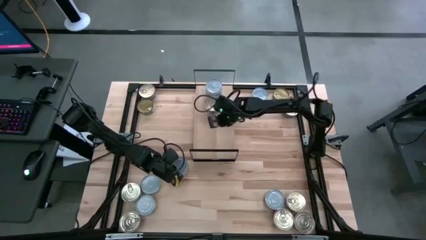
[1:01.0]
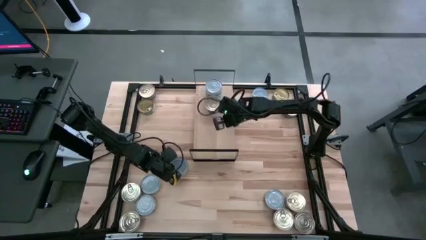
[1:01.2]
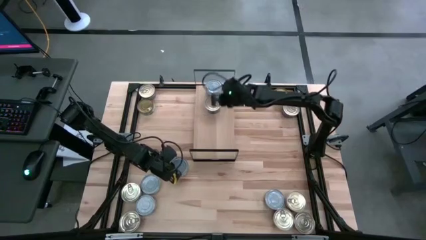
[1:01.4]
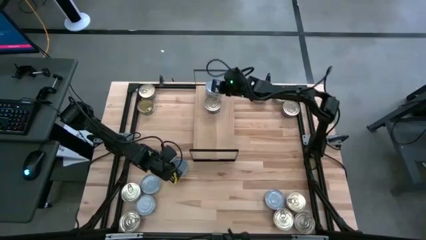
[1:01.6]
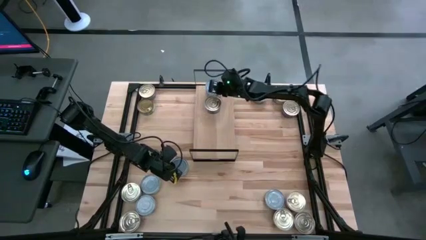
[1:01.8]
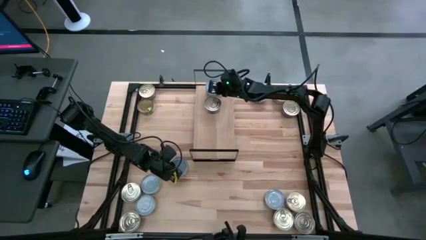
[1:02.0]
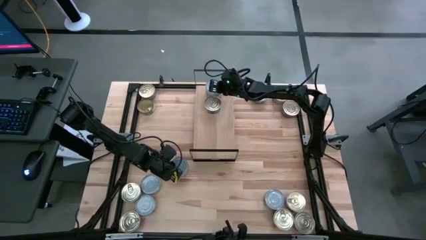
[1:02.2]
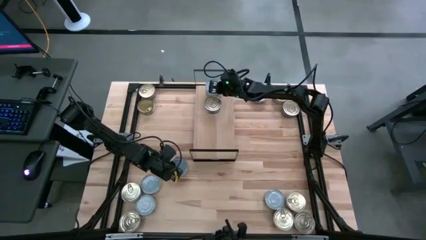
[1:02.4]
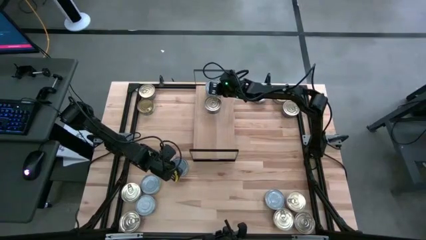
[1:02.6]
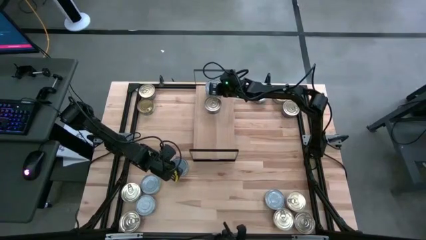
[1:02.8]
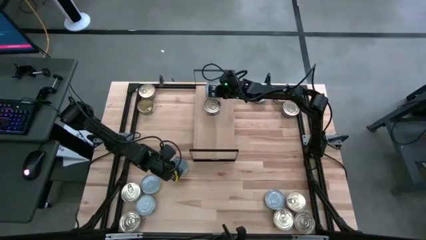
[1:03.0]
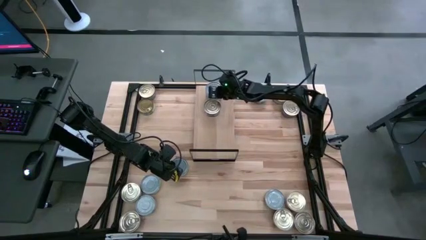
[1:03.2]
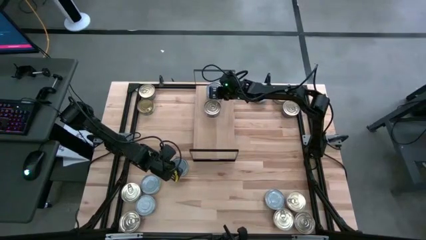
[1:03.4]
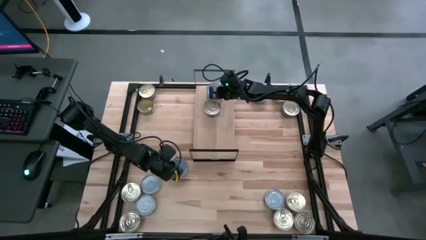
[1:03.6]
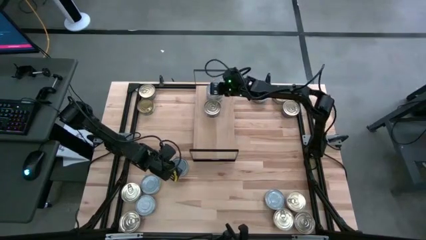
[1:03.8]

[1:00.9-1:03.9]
Task: Stack canned seafood by type on shelf
Adjust the green tuna can

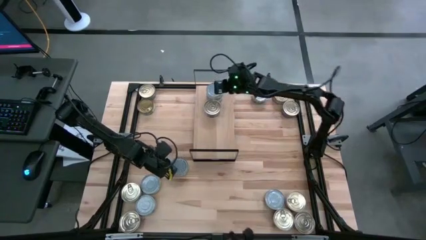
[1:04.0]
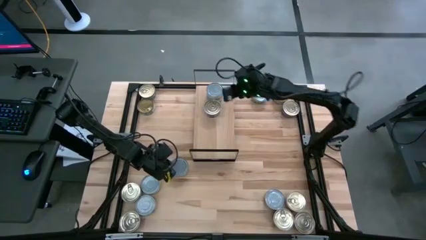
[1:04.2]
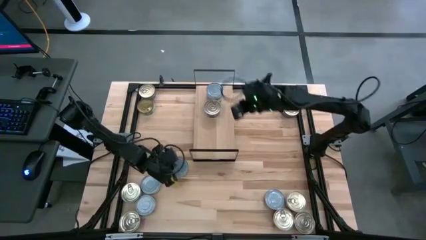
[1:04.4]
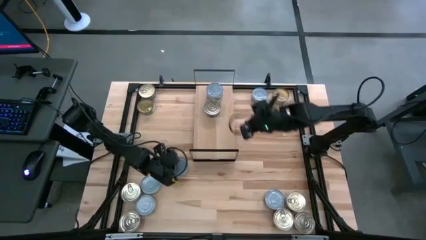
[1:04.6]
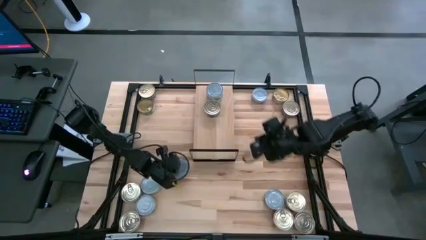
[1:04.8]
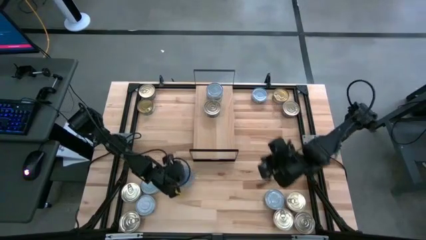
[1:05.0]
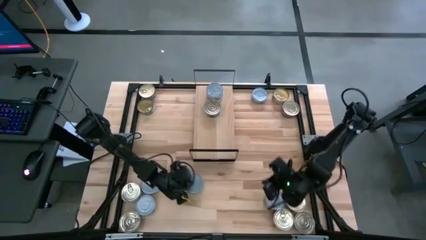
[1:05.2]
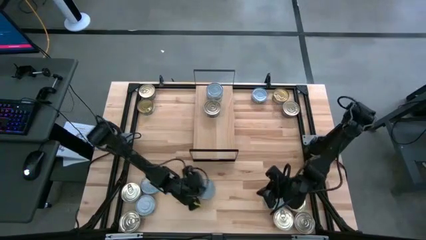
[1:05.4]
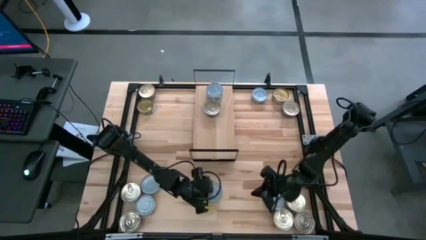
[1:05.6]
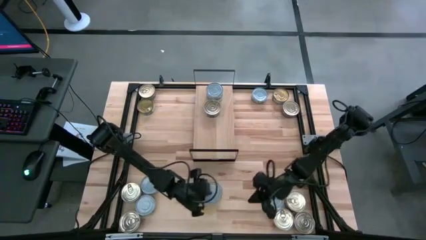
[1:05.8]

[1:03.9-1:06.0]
Move the green tuna can to the bottom middle of the table

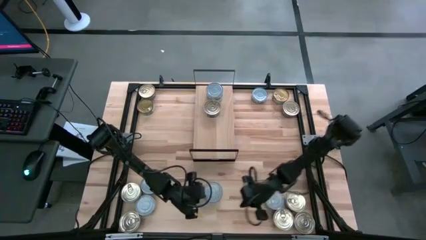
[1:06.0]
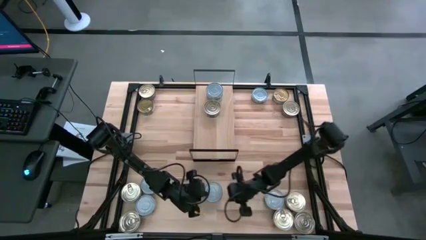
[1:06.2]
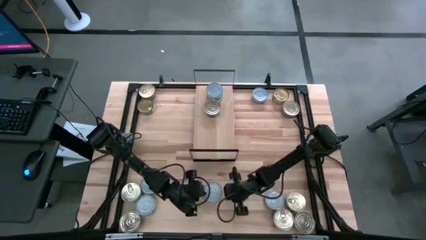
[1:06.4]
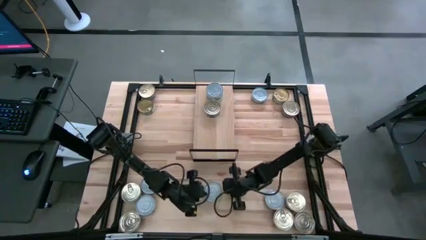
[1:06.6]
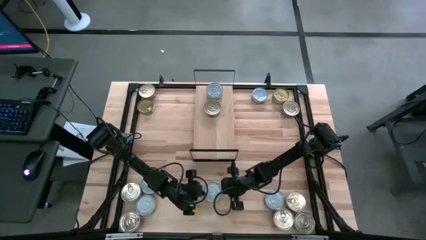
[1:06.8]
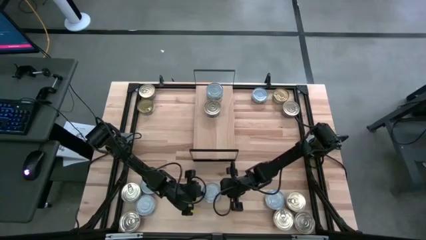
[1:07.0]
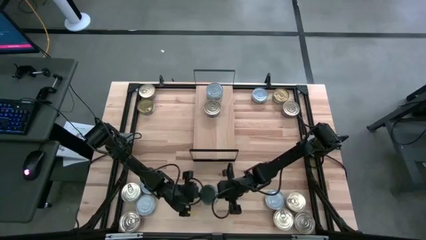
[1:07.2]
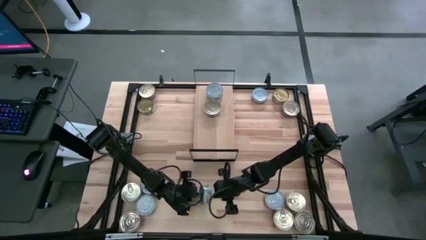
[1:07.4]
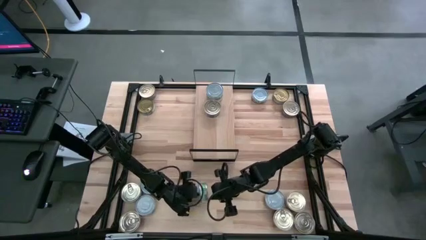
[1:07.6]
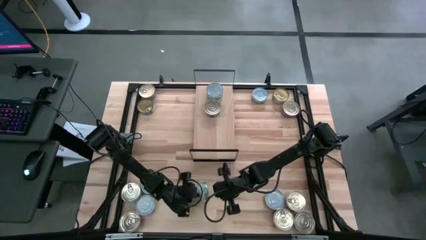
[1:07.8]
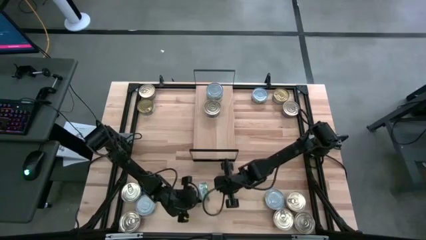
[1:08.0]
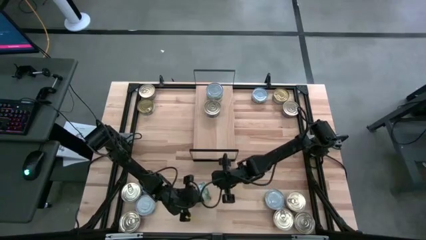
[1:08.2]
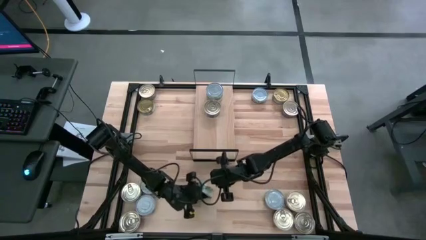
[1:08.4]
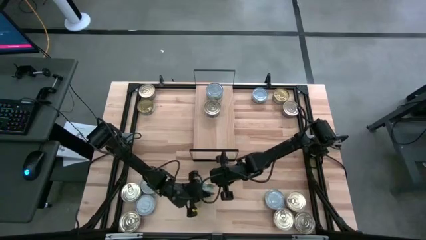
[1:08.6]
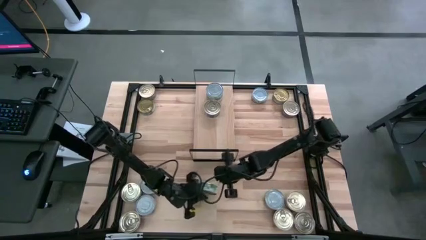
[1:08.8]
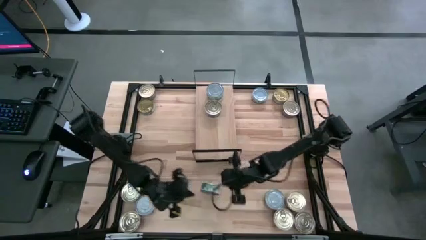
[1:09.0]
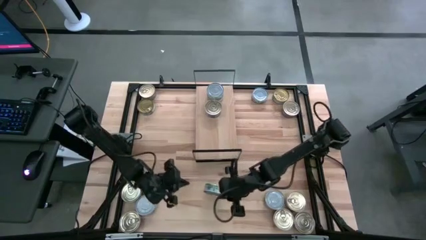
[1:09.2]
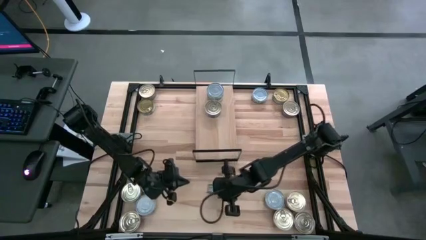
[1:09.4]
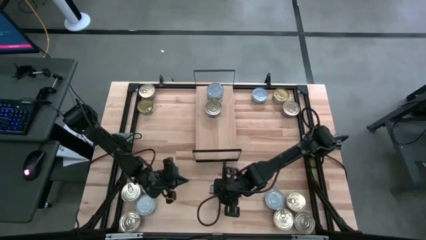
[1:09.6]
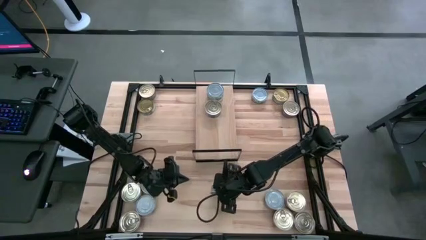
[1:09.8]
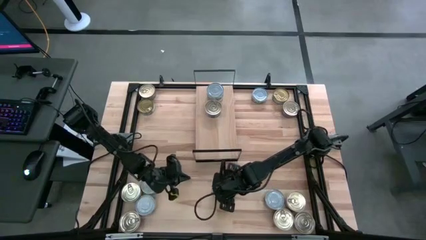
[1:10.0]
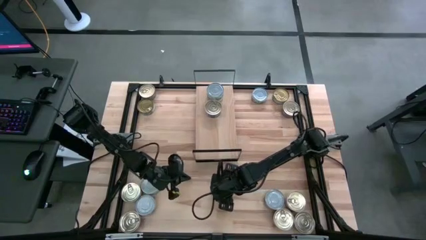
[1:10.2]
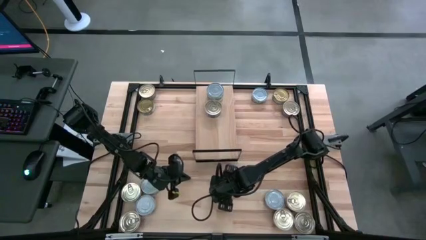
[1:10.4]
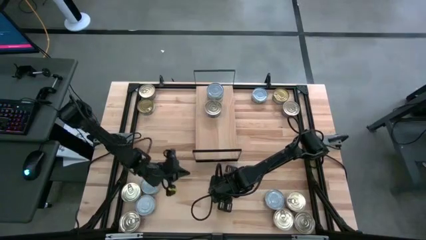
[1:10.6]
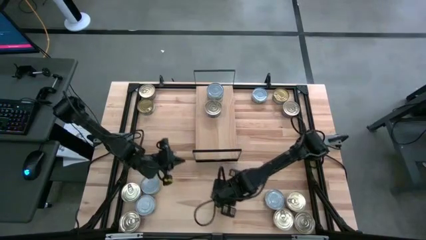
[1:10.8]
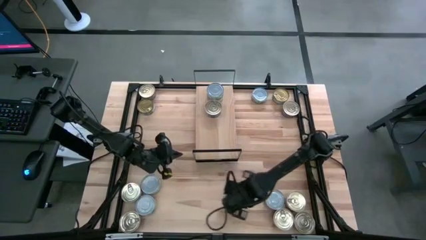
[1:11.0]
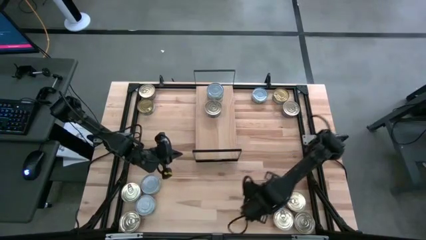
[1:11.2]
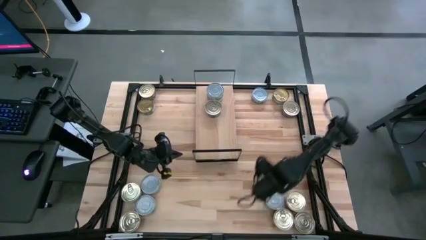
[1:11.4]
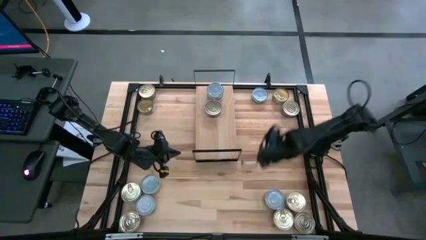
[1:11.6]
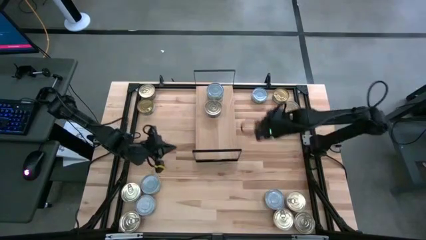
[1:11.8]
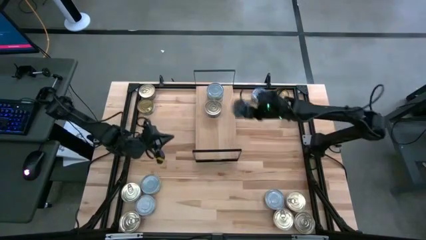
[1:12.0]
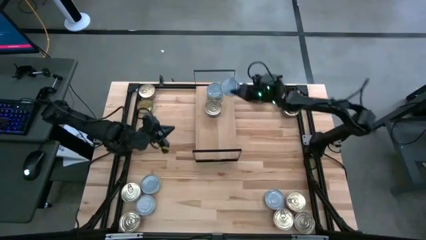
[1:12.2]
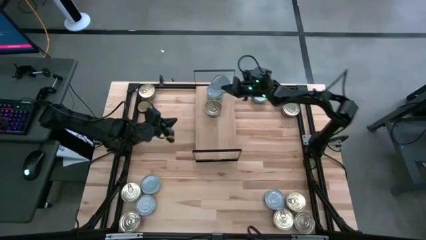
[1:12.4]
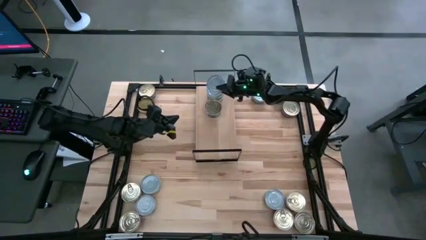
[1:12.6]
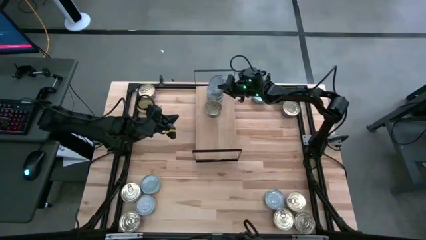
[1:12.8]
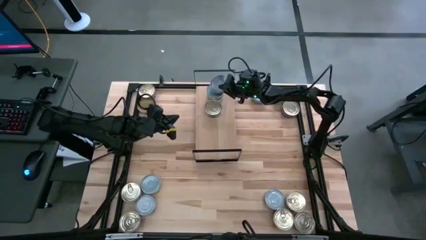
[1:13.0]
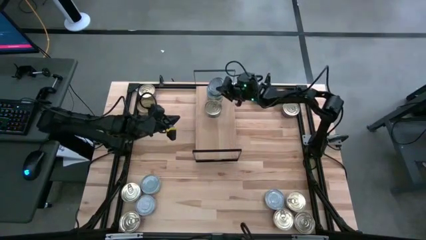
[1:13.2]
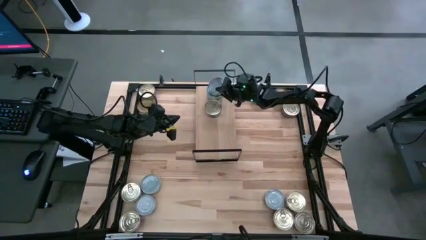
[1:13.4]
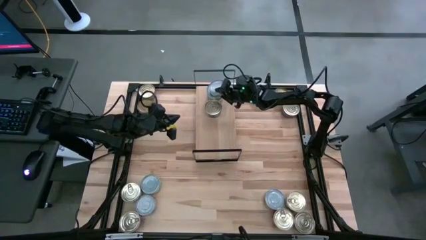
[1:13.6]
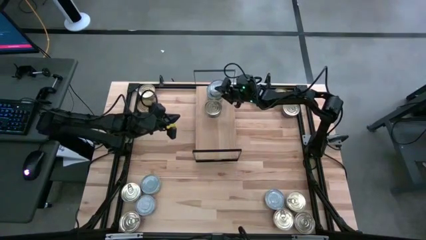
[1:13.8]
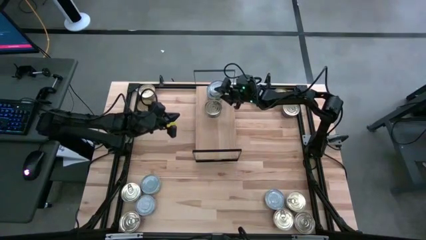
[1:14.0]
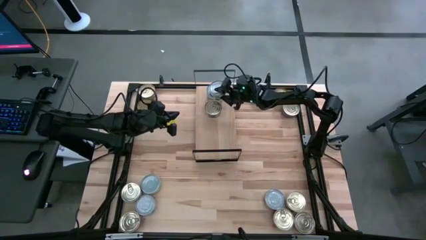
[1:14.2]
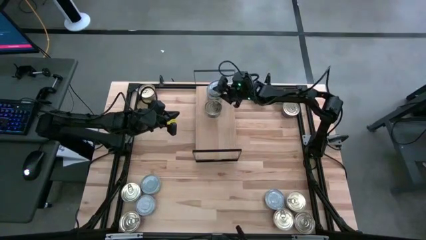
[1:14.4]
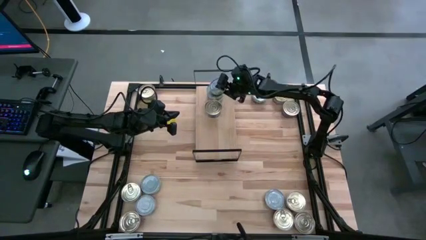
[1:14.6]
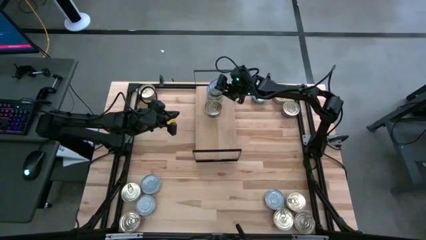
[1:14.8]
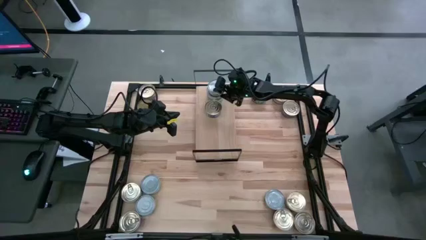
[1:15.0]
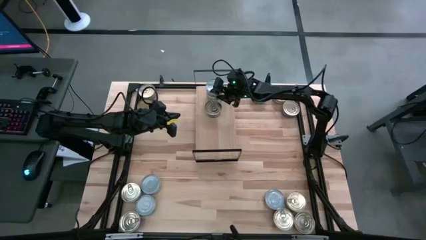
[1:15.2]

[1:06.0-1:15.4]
Stack the green tuna can on top of the green tuna can on the shelf

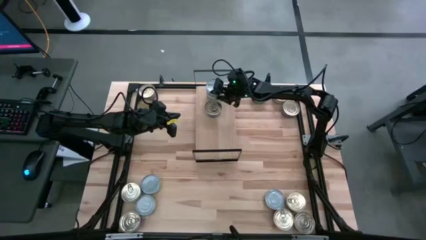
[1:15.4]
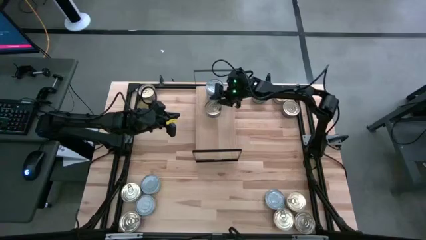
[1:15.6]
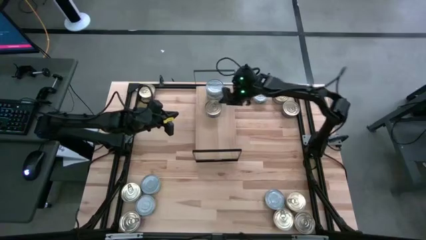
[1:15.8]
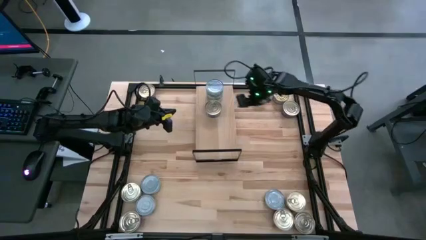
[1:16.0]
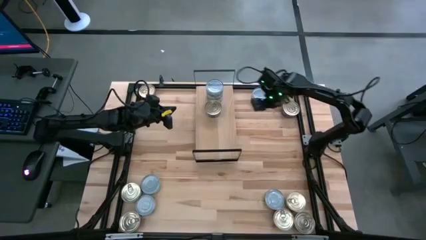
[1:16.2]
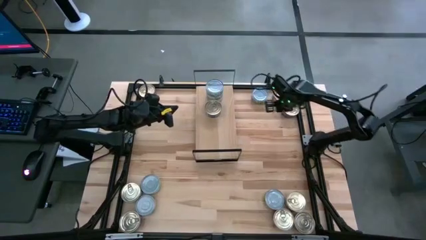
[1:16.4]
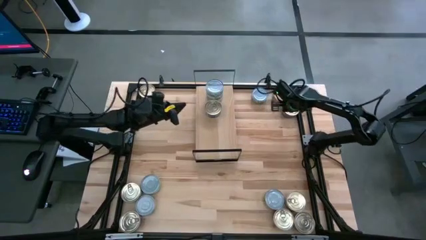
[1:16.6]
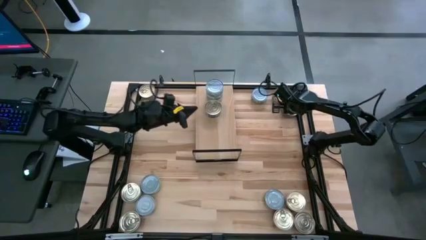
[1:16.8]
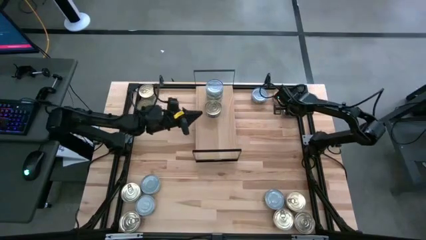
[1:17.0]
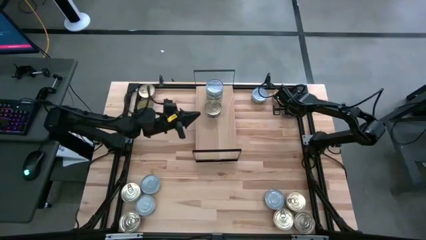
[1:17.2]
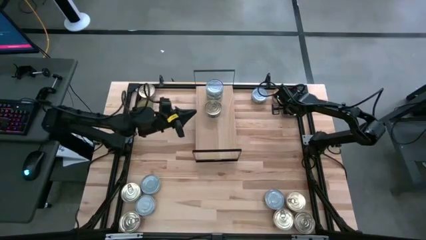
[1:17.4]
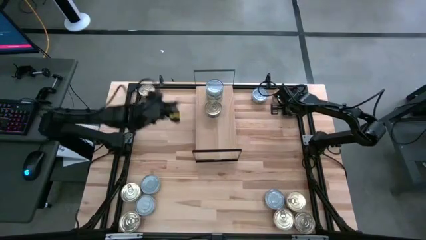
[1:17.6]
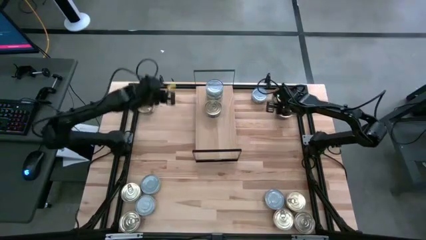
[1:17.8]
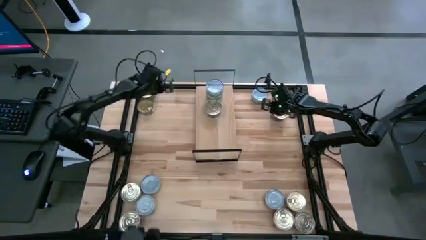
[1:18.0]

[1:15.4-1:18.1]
Adjust the pink and blue tuna cans
